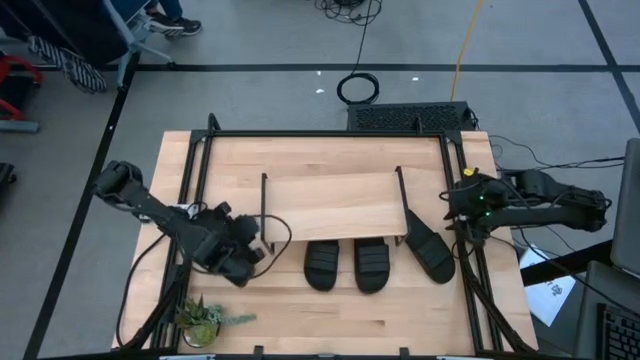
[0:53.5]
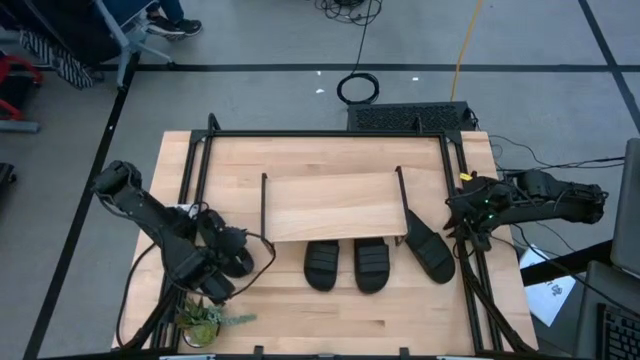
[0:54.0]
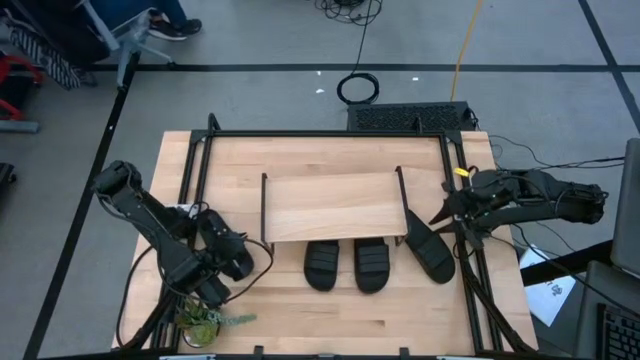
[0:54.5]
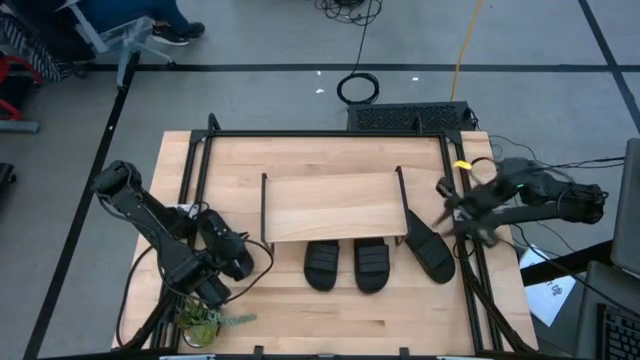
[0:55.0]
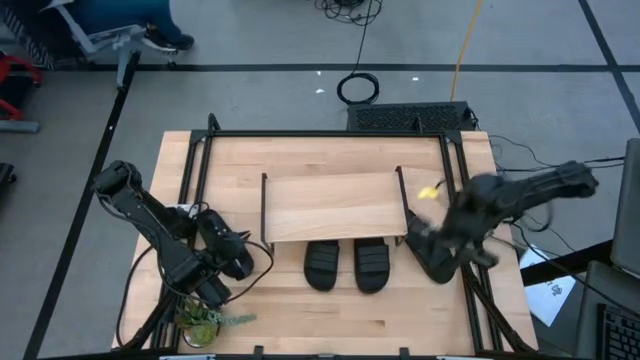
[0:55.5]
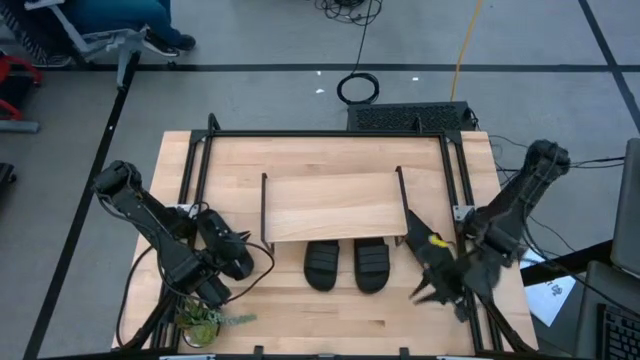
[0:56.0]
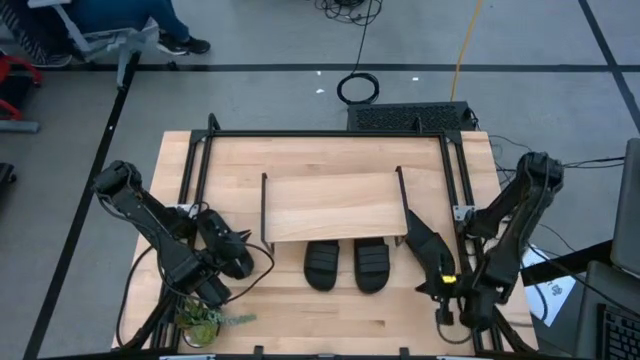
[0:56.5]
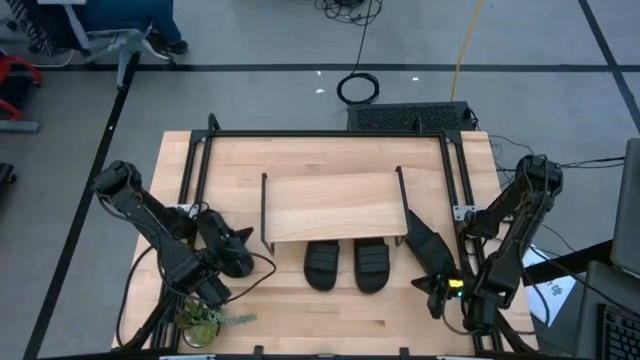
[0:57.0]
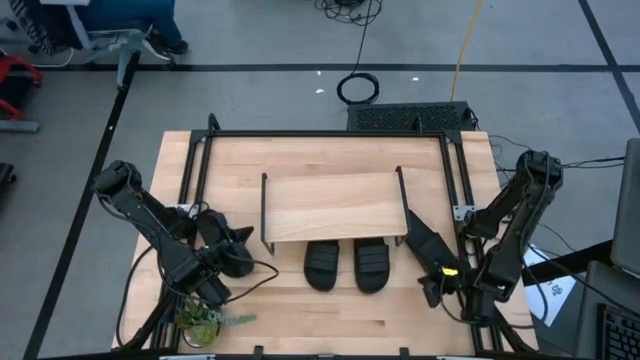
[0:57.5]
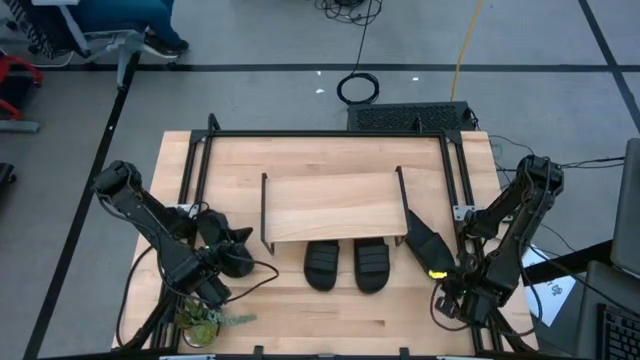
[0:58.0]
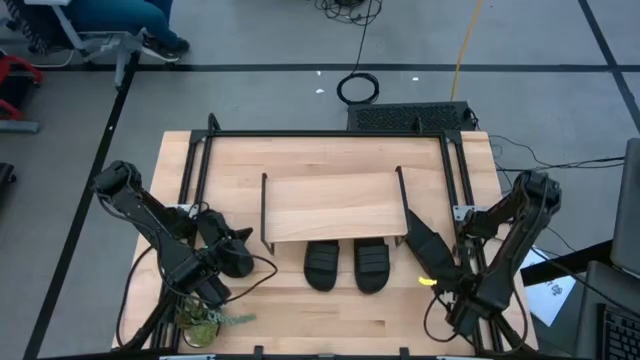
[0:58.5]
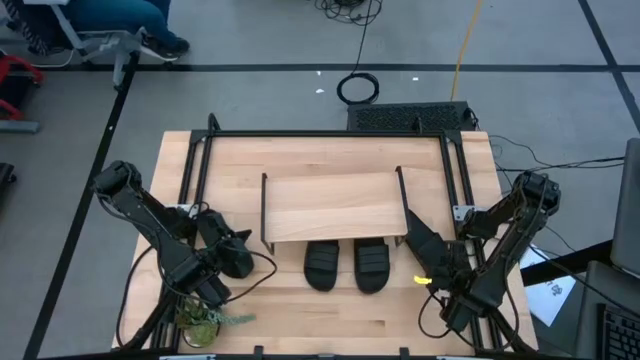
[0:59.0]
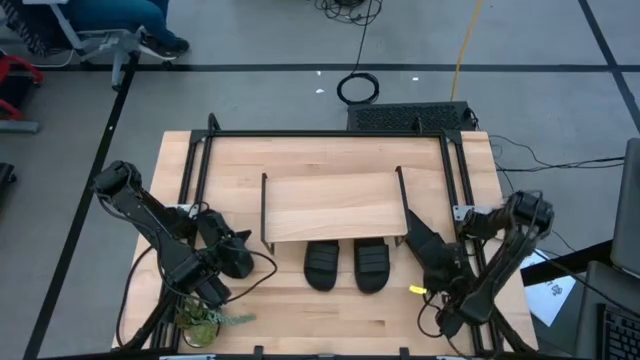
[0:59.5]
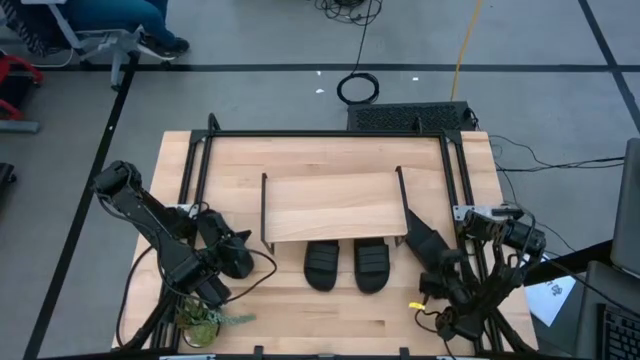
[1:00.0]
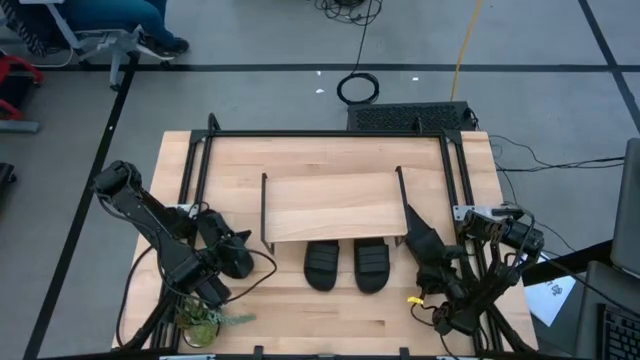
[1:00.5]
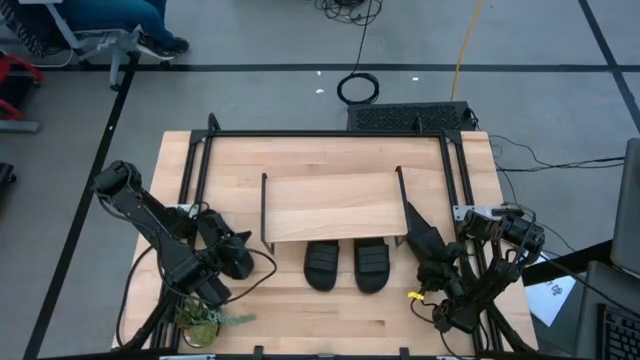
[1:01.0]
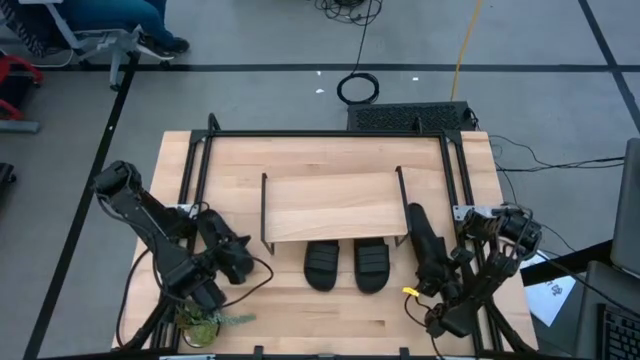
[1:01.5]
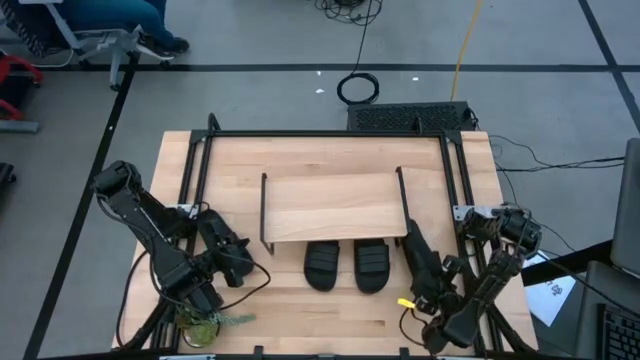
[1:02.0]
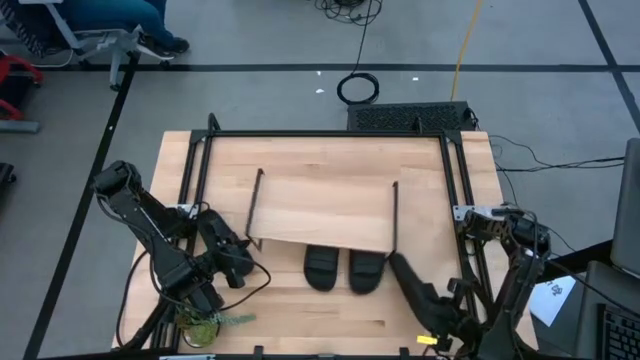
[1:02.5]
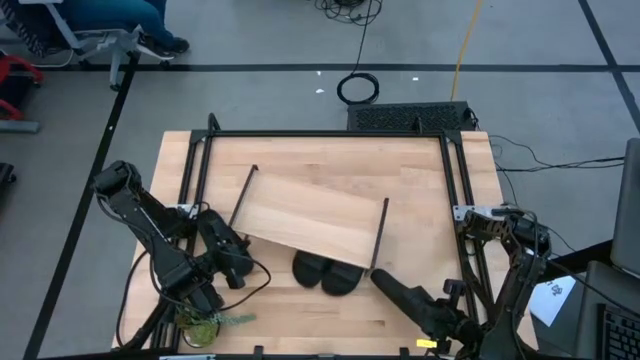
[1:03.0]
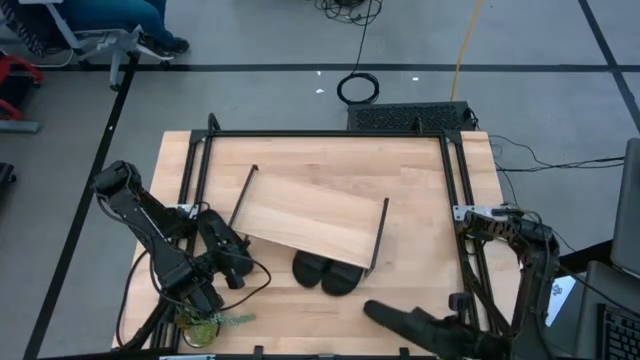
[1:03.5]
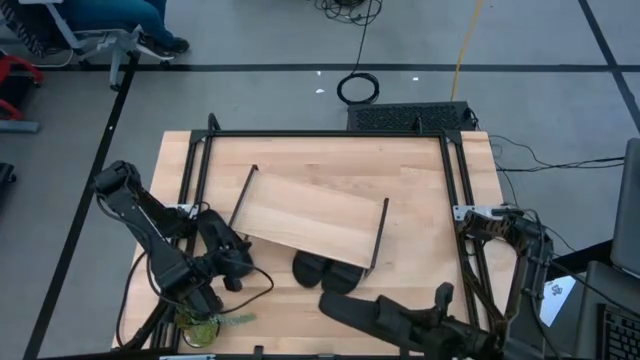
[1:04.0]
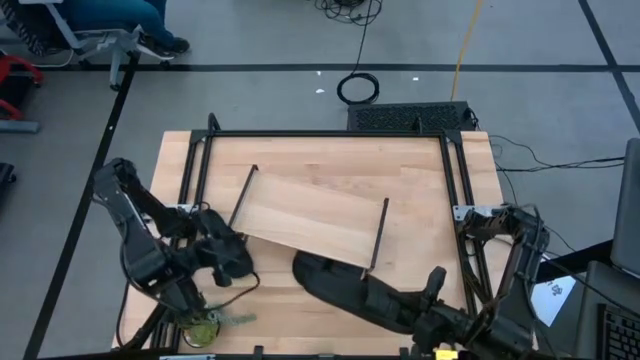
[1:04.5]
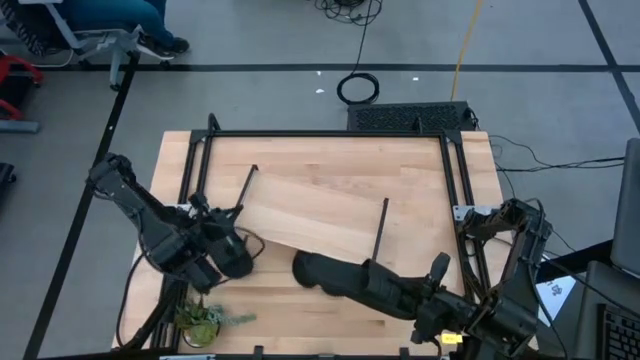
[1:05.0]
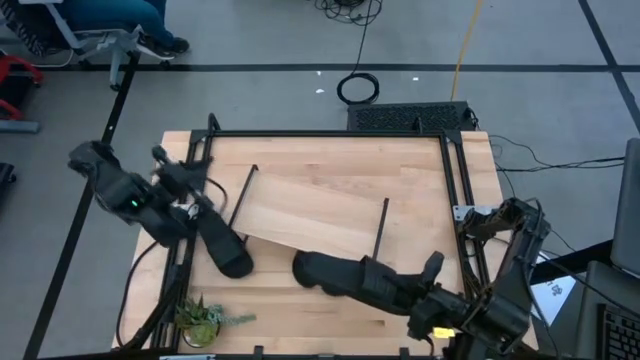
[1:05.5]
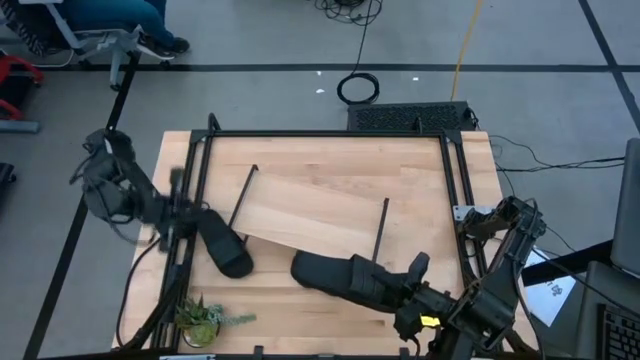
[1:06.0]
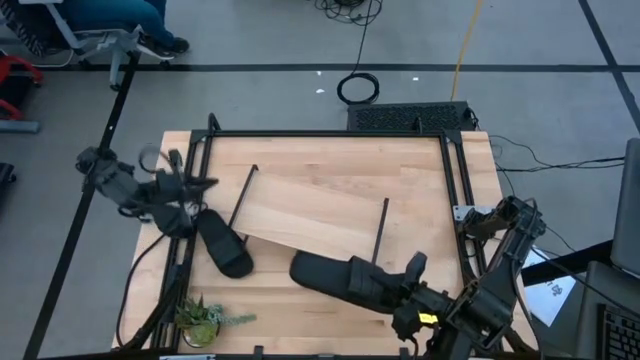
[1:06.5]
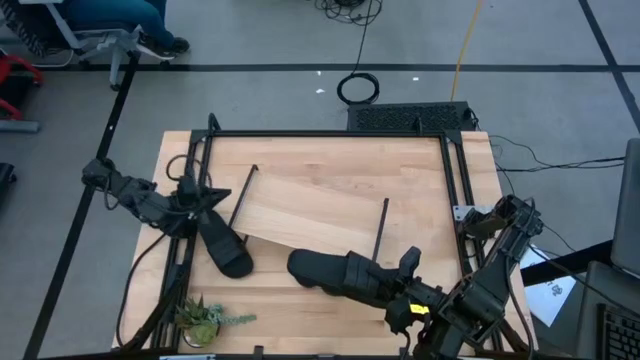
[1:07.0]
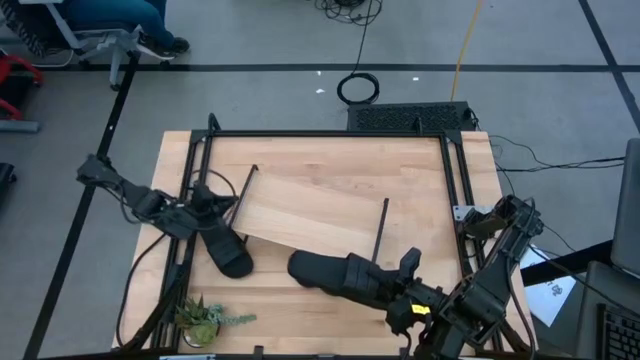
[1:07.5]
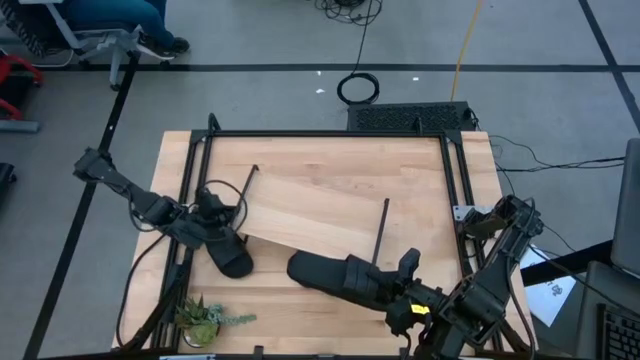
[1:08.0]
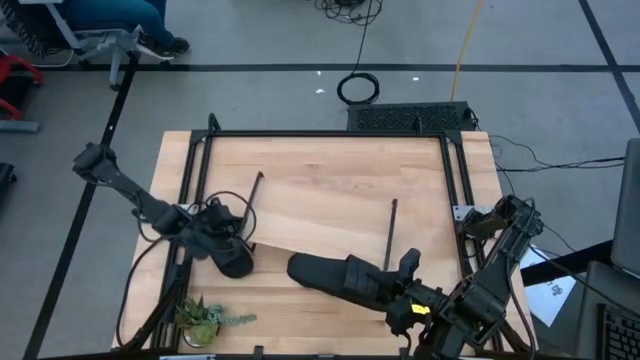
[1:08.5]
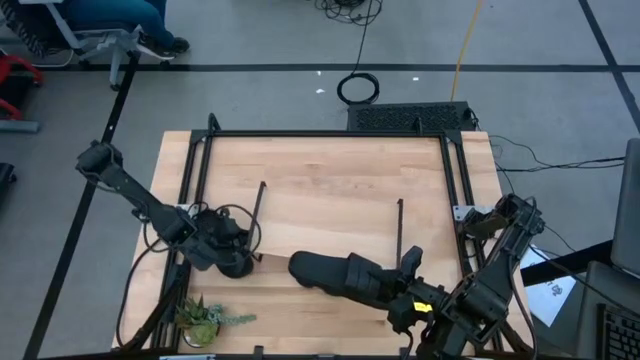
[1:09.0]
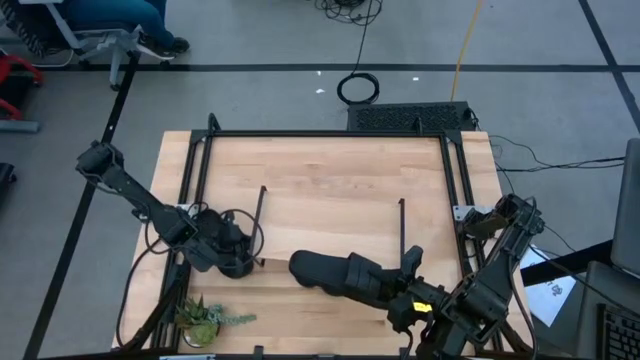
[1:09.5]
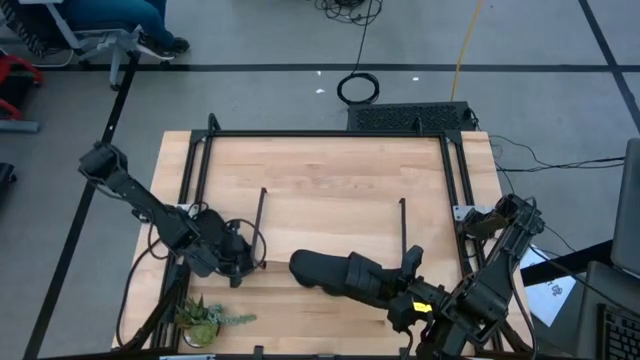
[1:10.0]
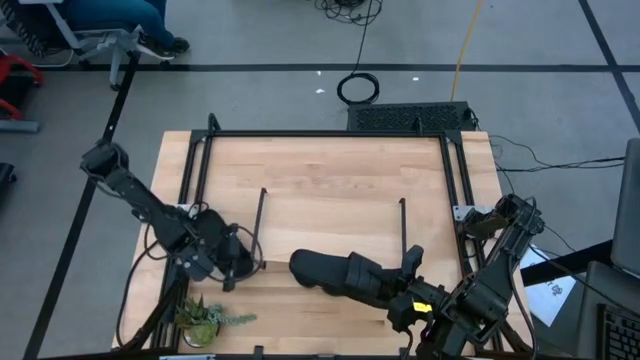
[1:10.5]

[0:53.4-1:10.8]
Task: Pick and place slides into the shelf
Put the right black slipper on the shelf

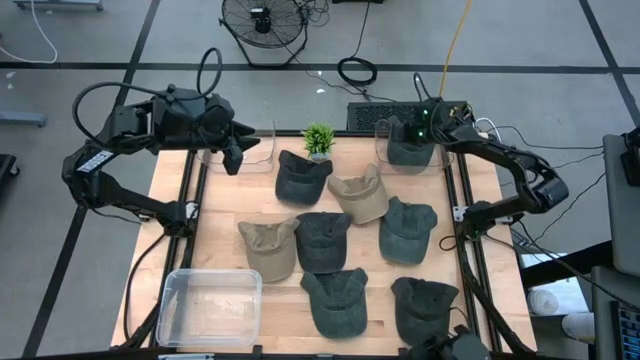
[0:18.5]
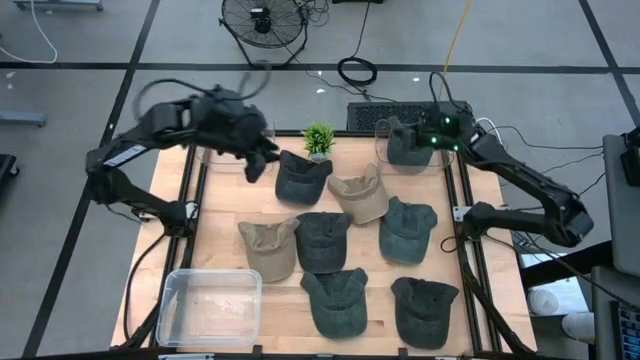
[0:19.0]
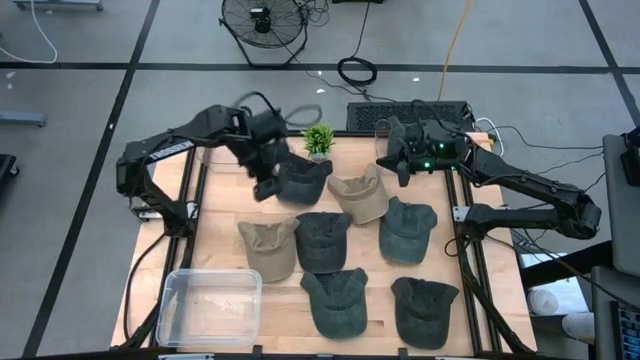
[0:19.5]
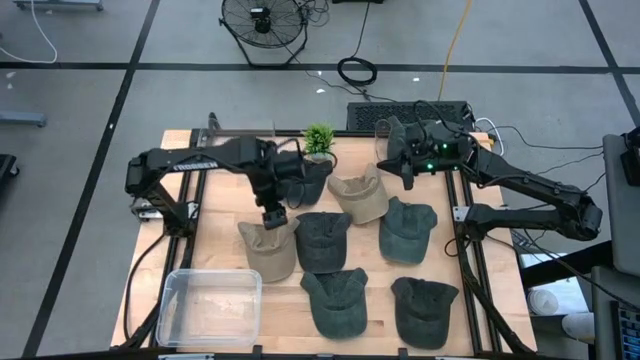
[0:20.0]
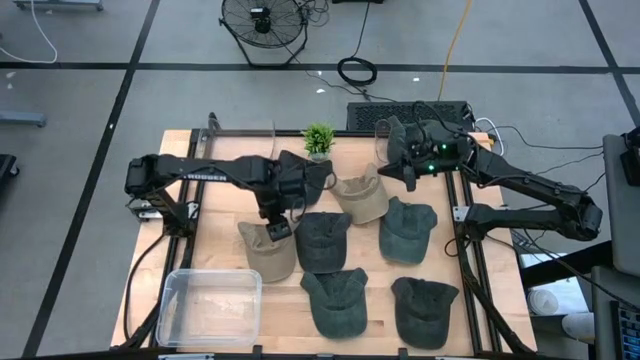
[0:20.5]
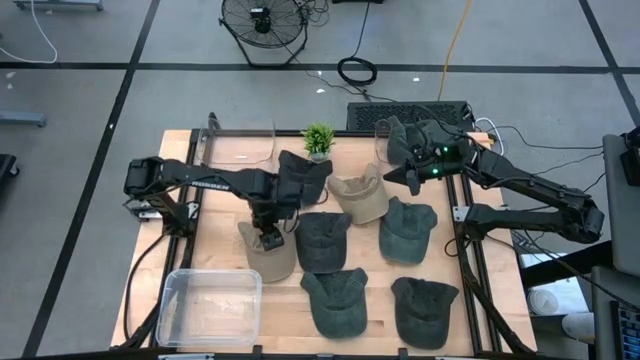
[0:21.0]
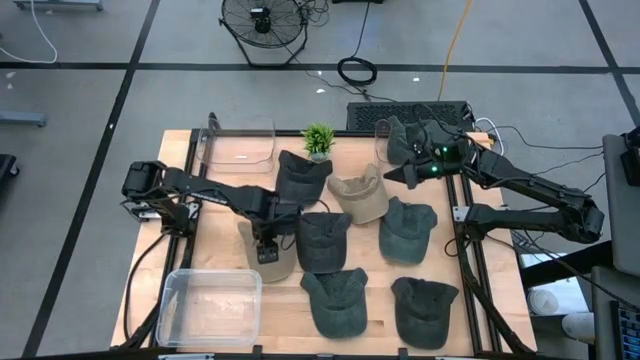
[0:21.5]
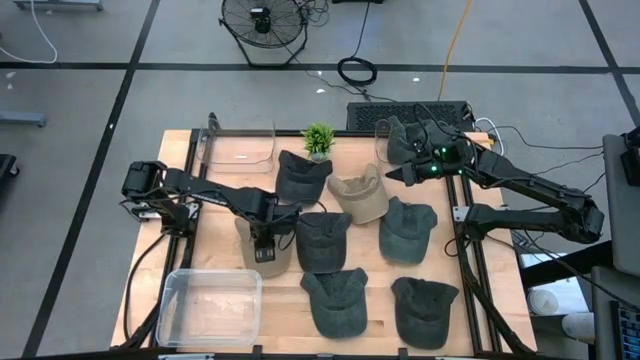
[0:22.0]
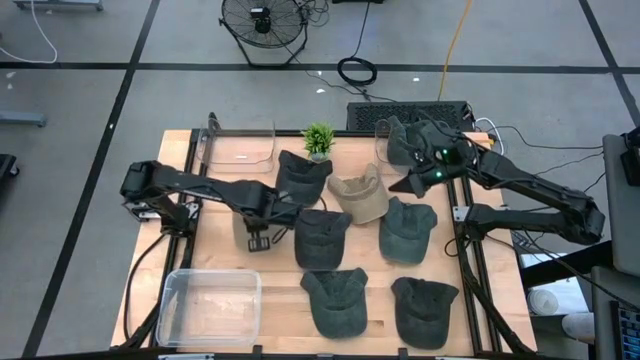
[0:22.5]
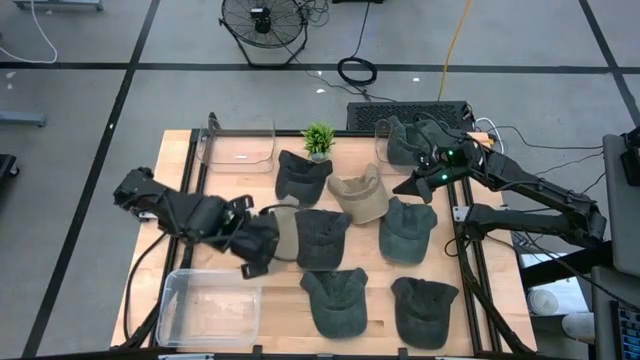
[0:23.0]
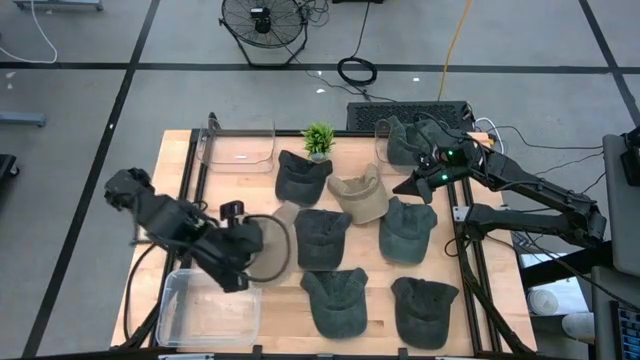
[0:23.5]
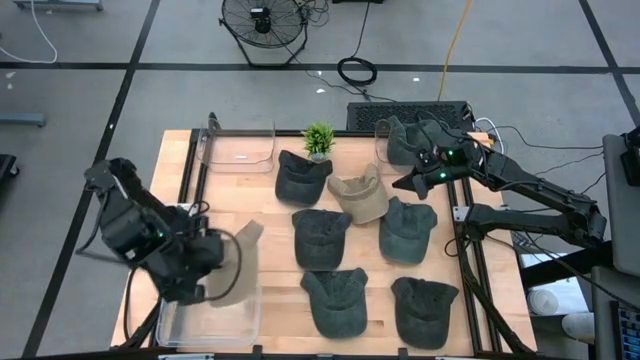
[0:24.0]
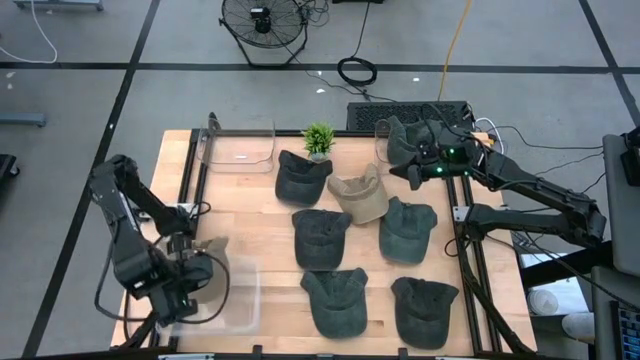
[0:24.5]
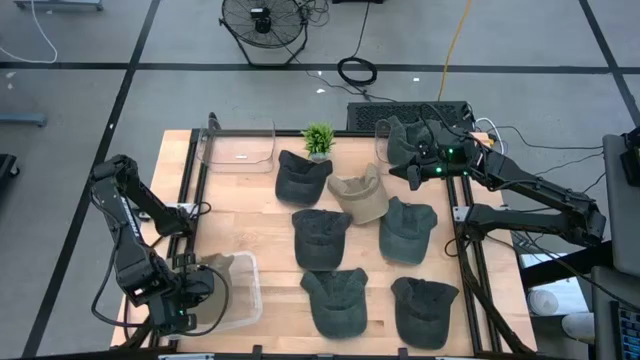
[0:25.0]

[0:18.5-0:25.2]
Task: Pick & Place hat
Put the bottom brown cap into the bottom transparent container
